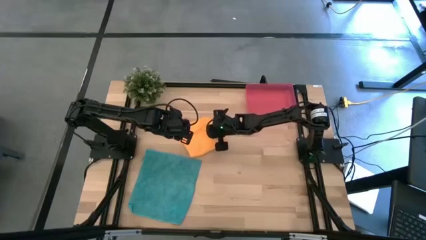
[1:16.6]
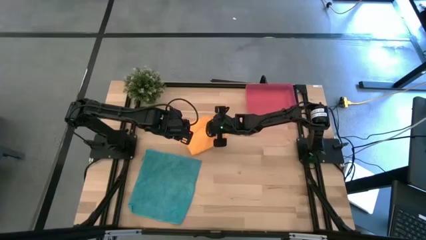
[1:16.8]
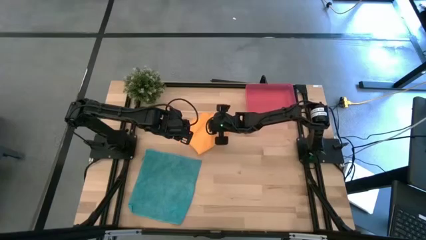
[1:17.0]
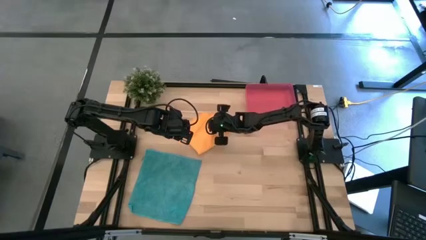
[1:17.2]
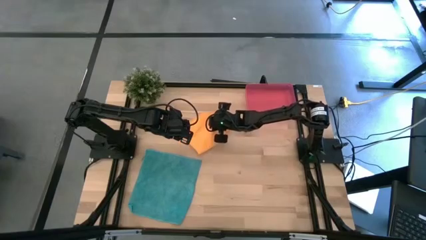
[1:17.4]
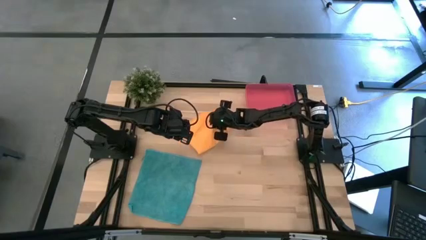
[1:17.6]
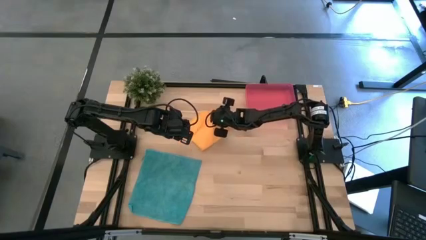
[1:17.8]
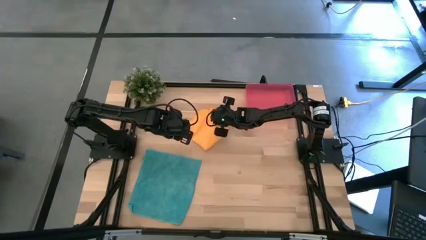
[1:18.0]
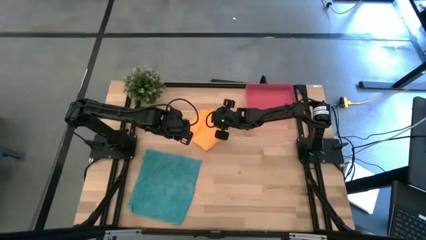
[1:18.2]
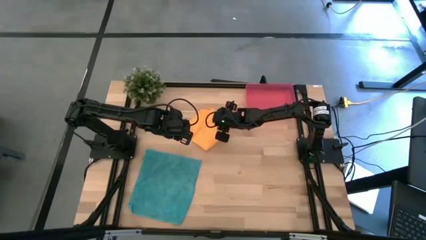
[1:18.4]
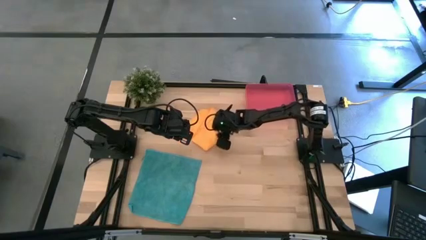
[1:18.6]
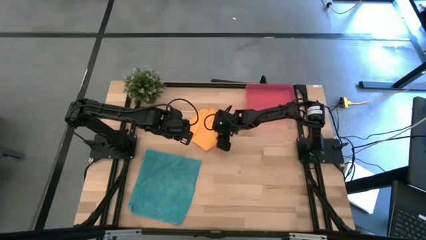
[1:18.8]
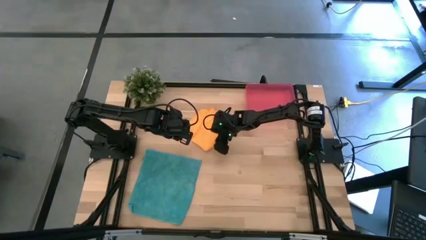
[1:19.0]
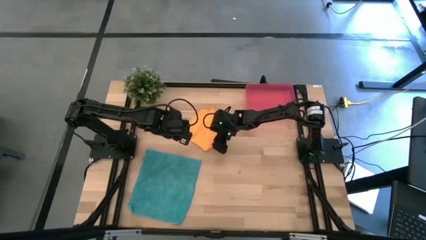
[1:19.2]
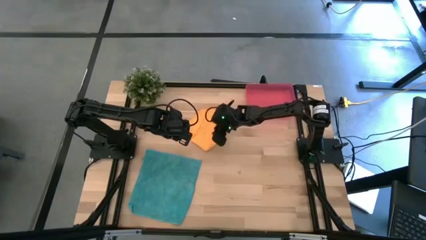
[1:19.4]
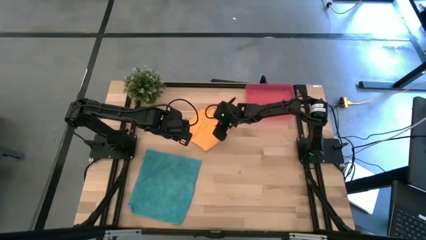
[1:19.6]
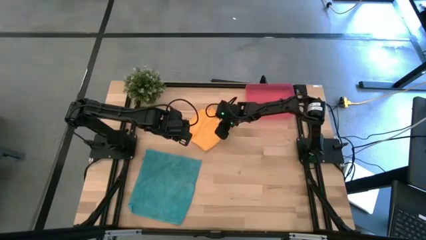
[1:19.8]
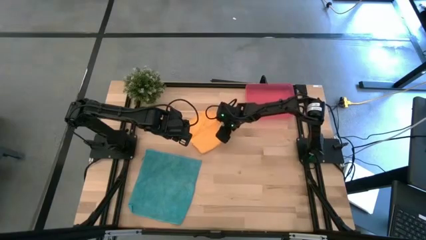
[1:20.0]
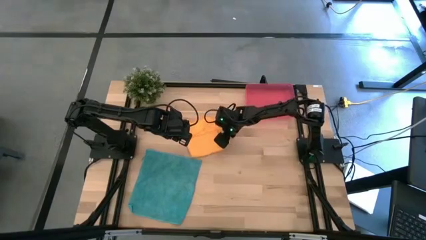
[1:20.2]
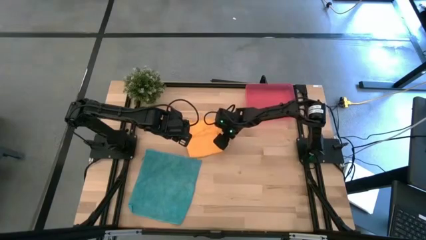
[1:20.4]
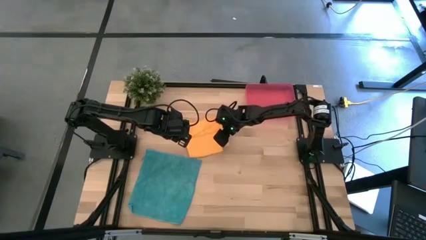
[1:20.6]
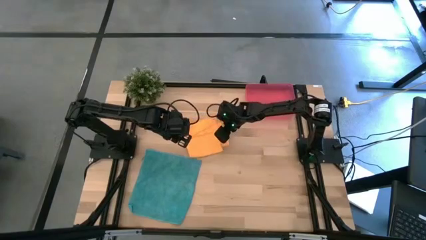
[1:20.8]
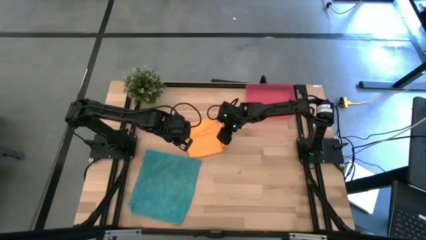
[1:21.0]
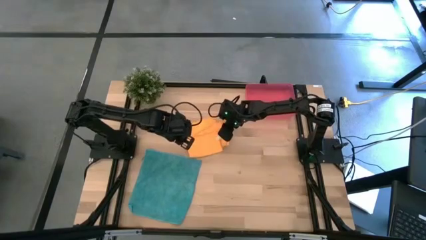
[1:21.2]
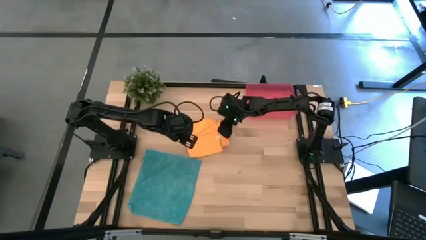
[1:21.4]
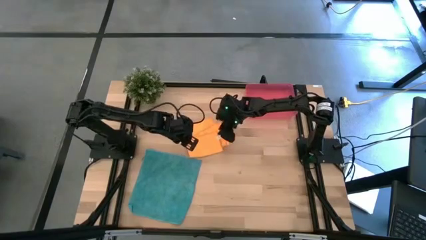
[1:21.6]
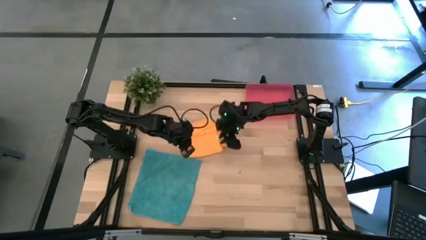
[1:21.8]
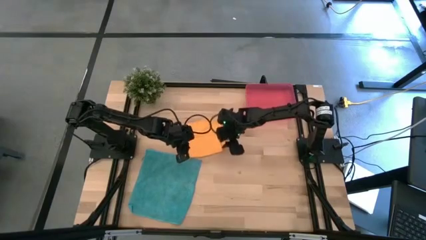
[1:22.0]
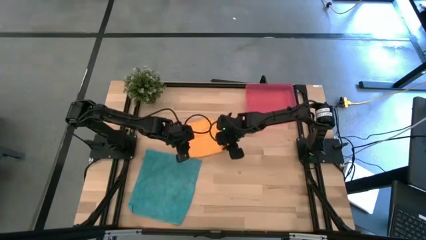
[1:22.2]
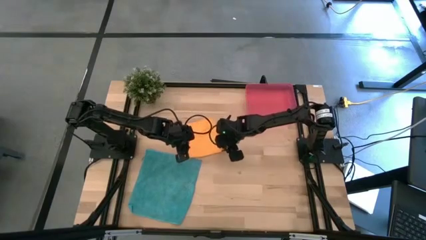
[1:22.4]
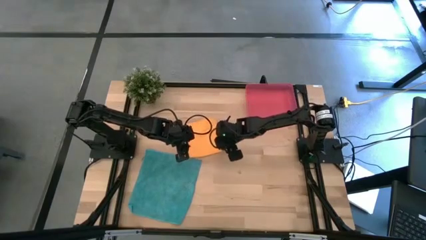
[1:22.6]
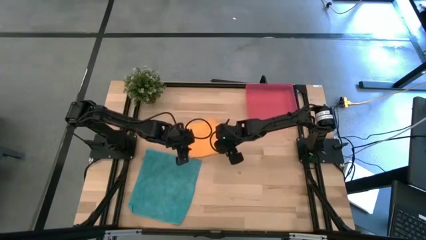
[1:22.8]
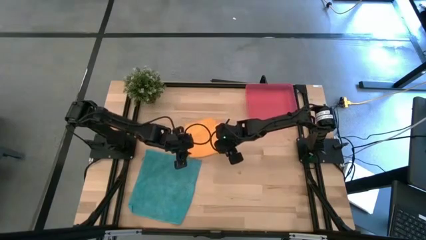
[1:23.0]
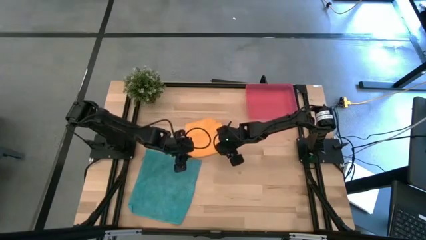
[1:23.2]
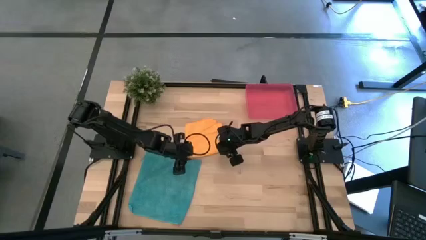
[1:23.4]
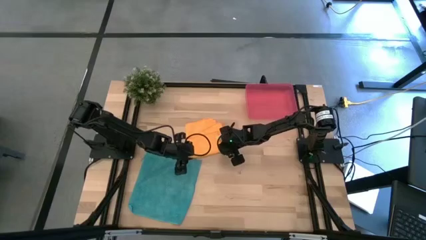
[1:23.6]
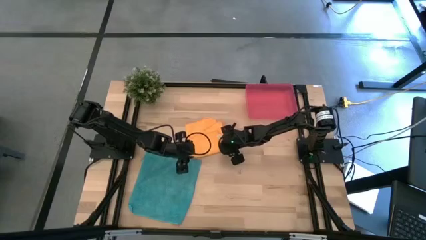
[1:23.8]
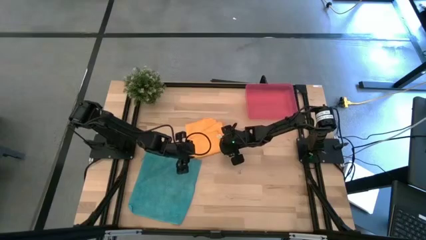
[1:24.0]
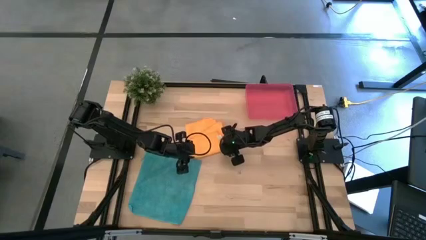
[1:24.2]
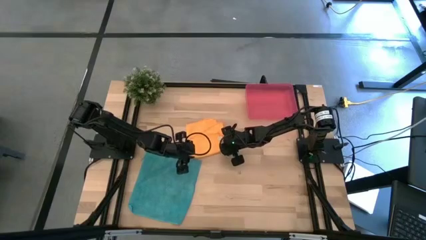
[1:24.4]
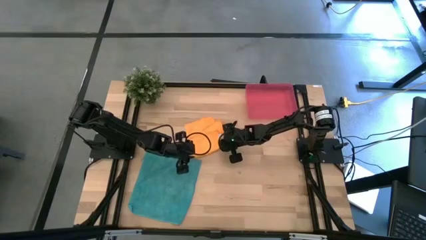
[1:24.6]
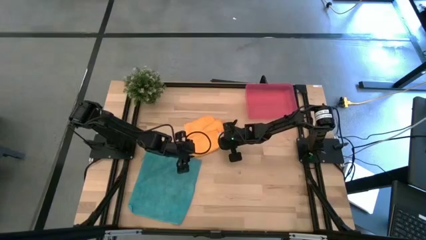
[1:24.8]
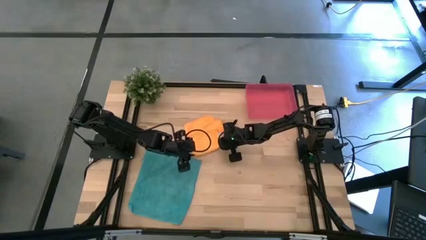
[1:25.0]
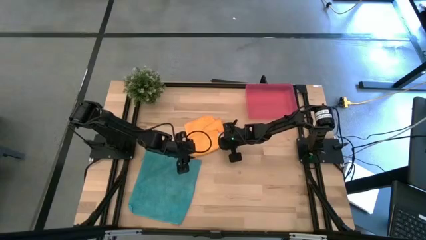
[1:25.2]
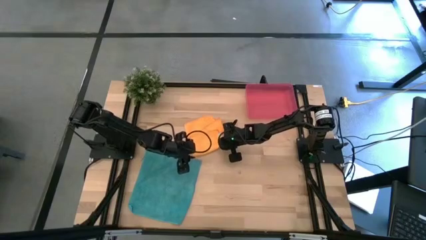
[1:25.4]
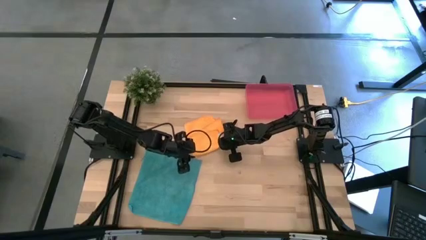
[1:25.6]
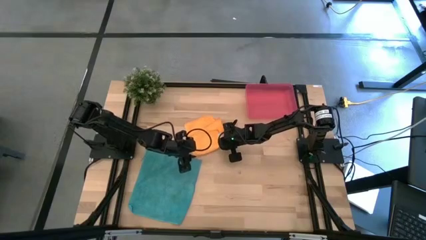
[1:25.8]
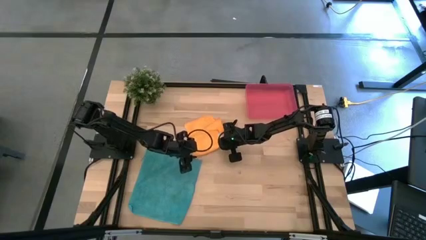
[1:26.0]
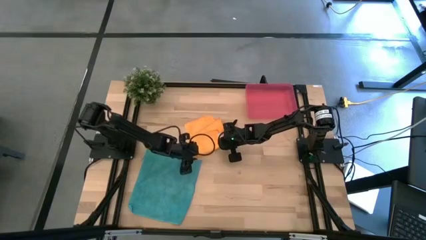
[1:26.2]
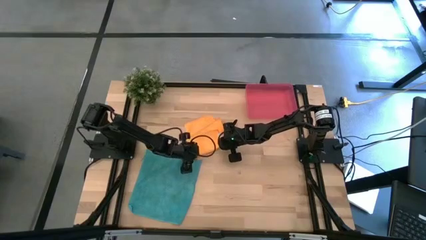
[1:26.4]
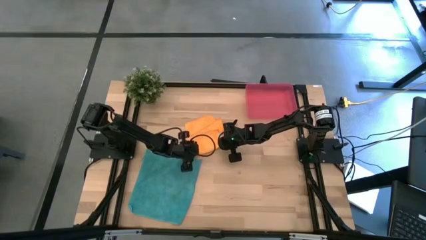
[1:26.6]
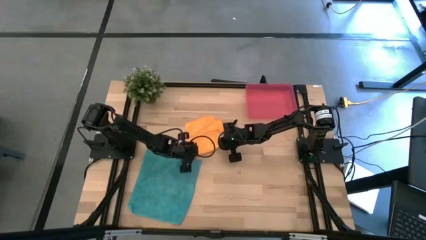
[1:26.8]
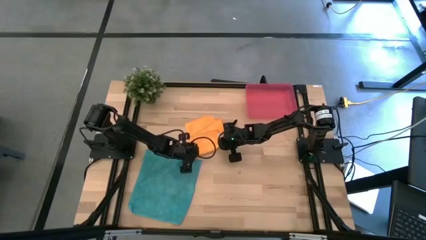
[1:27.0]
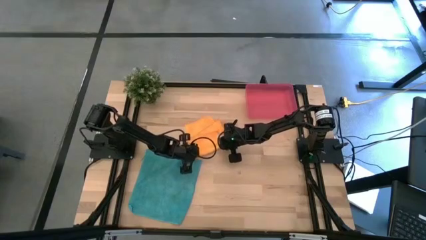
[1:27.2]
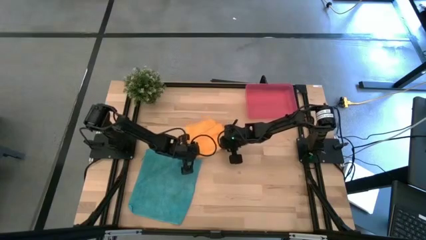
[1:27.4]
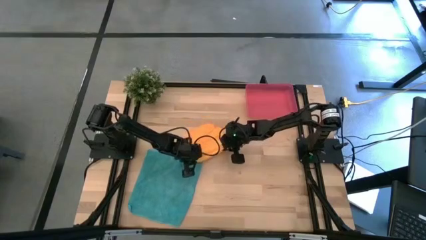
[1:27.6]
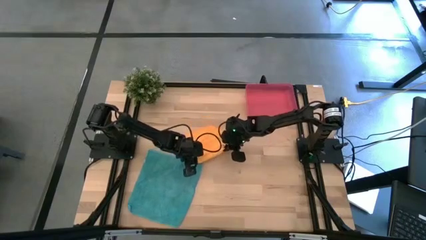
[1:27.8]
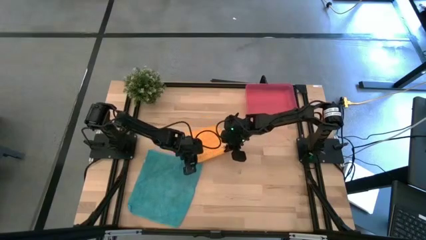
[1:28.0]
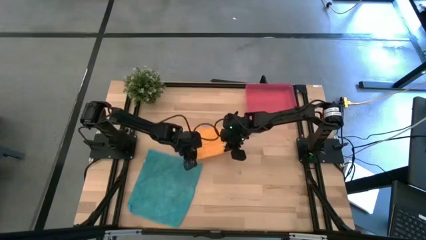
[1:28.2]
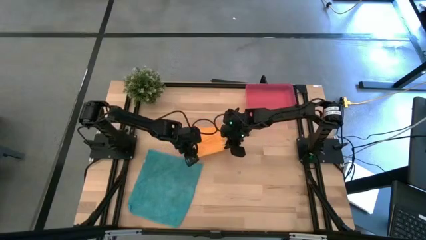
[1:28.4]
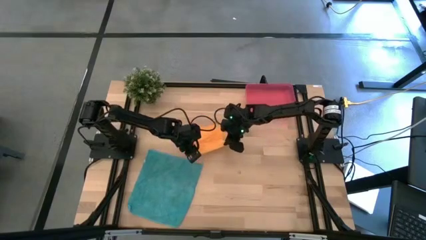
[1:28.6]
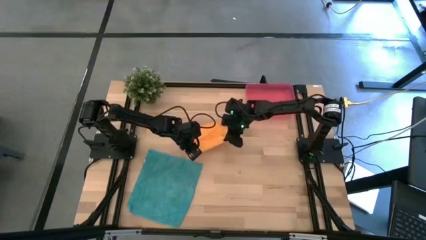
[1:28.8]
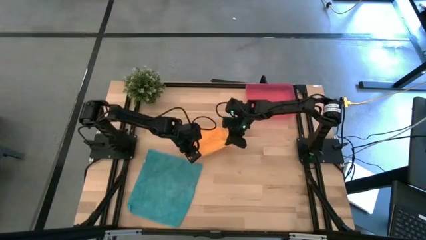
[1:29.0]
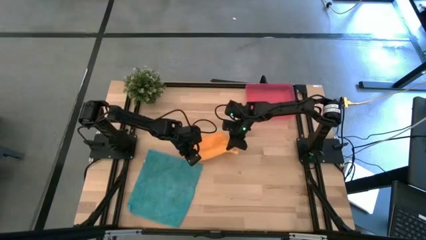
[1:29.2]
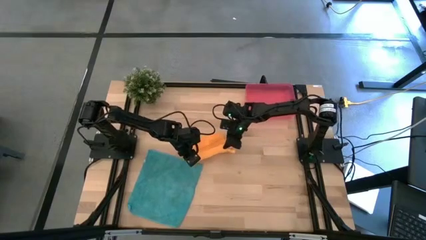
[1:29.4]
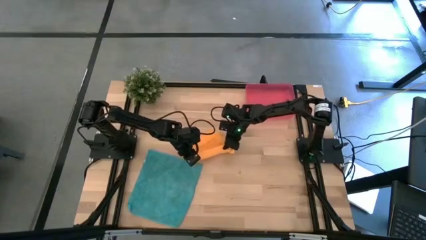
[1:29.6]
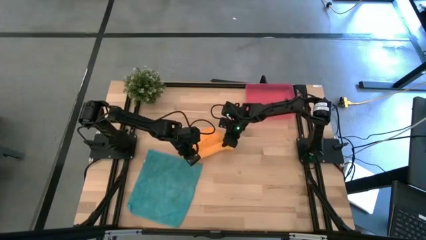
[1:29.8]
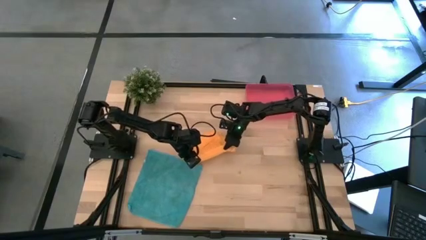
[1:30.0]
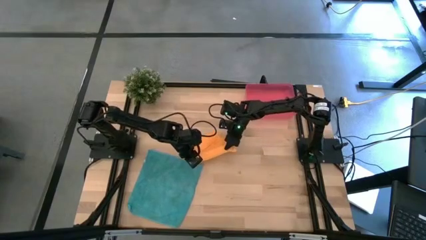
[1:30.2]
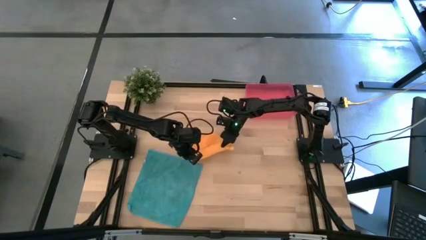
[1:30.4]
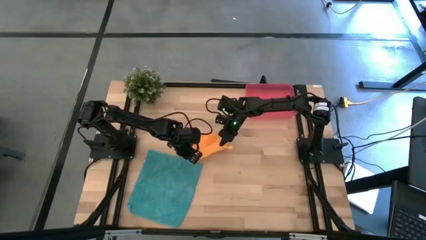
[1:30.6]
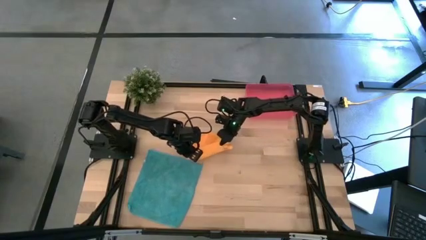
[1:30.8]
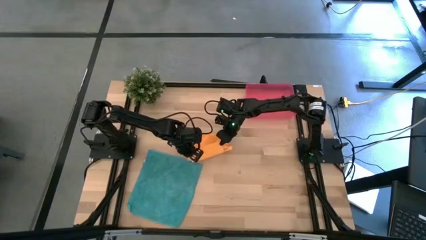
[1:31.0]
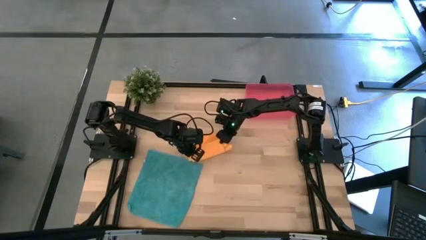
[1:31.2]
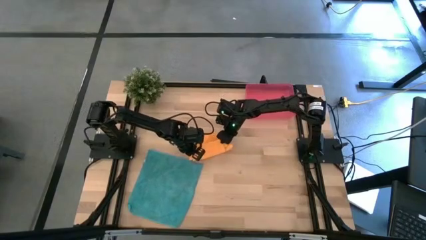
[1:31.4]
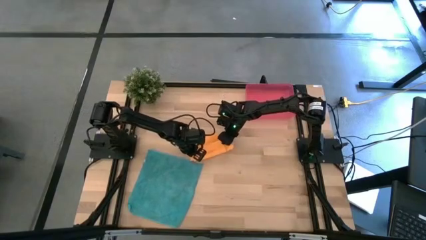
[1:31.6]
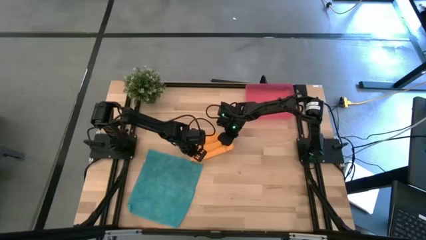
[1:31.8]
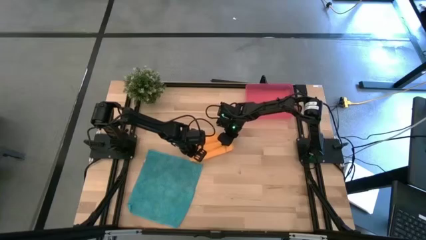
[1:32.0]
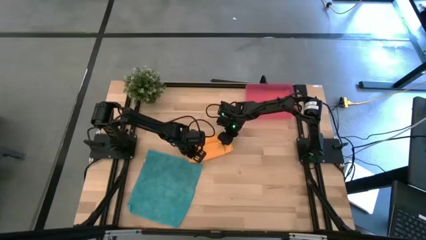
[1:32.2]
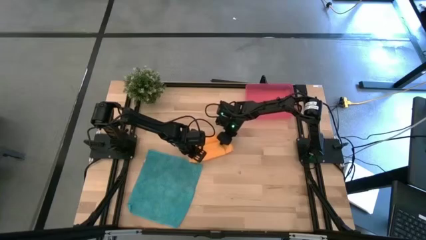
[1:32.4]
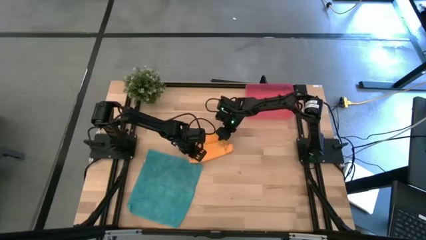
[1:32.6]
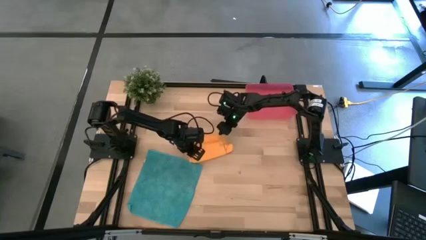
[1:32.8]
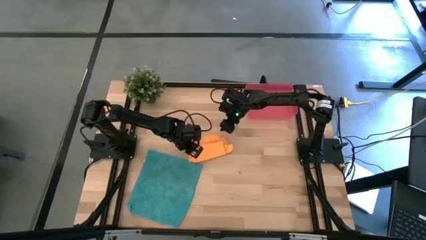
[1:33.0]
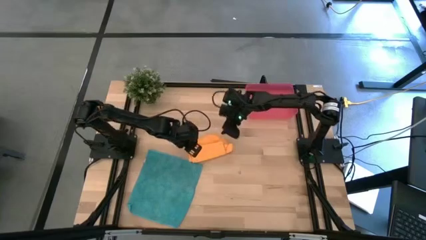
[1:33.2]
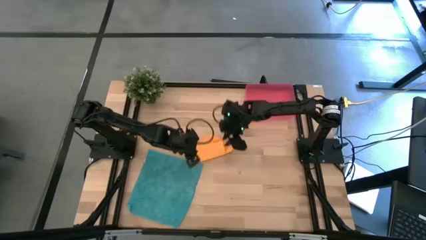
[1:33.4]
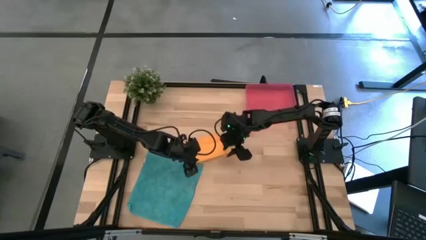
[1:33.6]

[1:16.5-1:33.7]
Task: Roll microfiber towels into tight, uniform cylinder then place into a basket
Fold the orange microfiber towel
